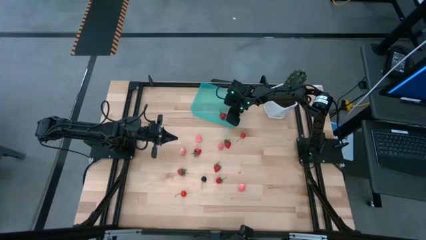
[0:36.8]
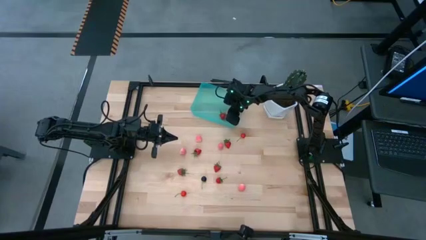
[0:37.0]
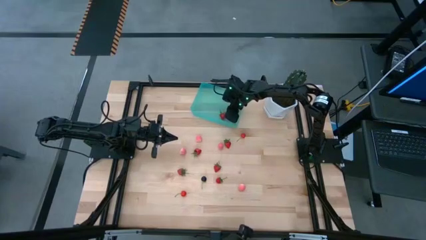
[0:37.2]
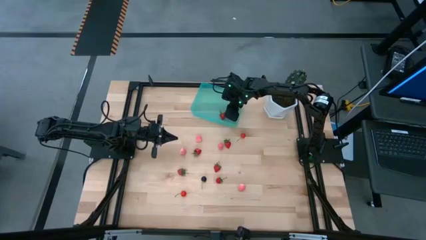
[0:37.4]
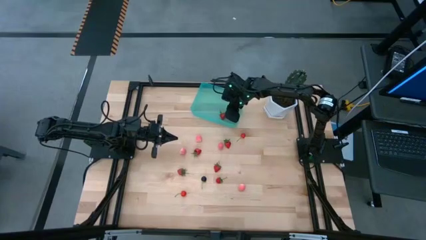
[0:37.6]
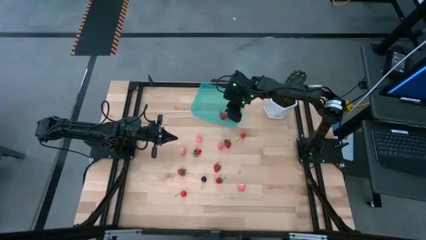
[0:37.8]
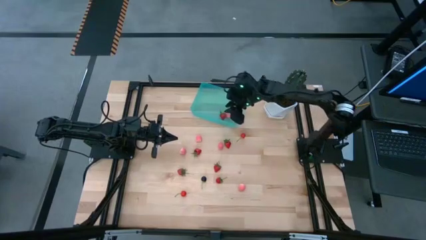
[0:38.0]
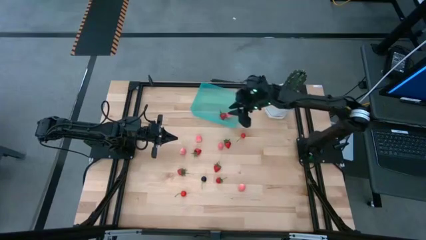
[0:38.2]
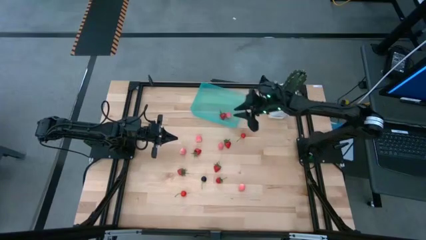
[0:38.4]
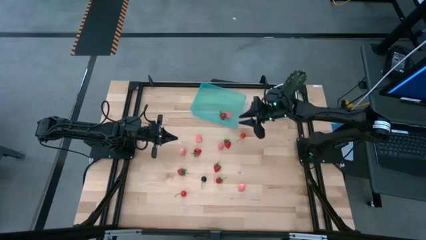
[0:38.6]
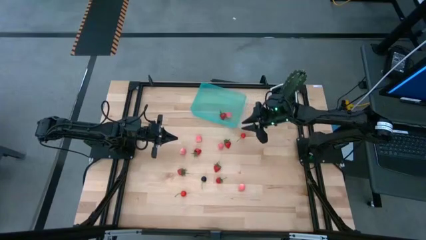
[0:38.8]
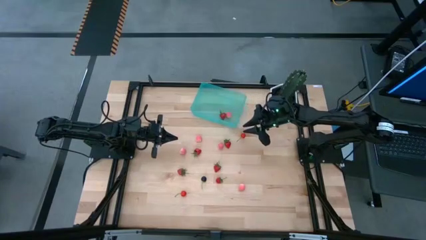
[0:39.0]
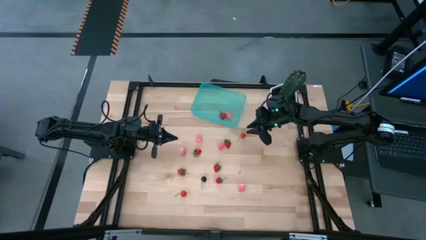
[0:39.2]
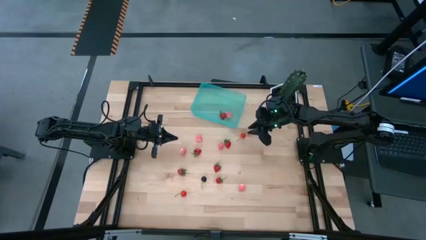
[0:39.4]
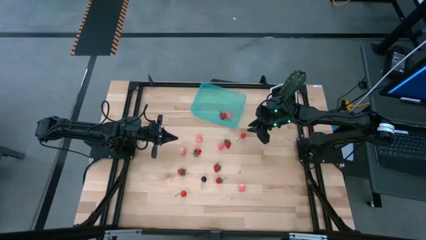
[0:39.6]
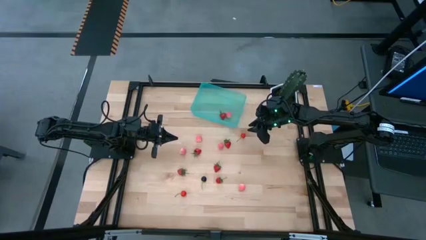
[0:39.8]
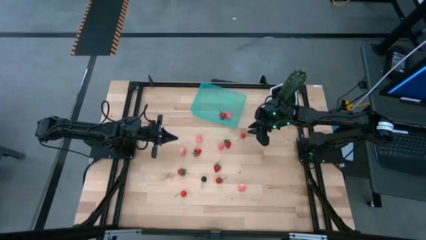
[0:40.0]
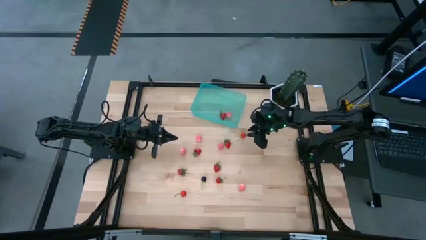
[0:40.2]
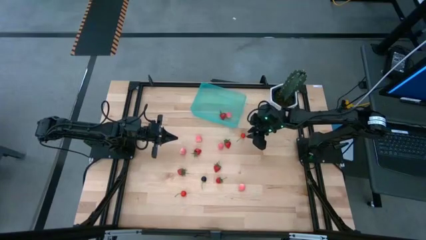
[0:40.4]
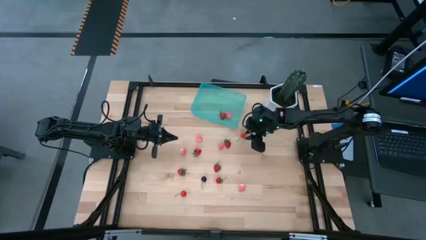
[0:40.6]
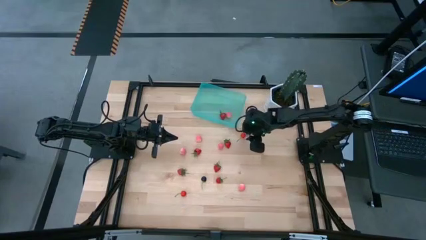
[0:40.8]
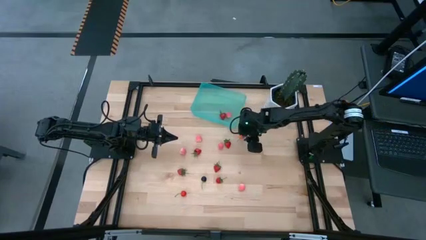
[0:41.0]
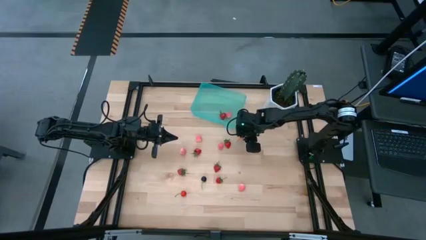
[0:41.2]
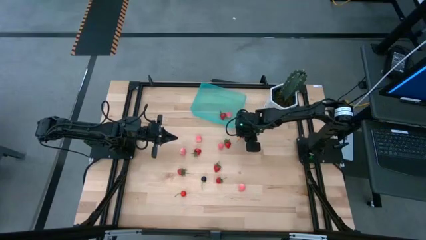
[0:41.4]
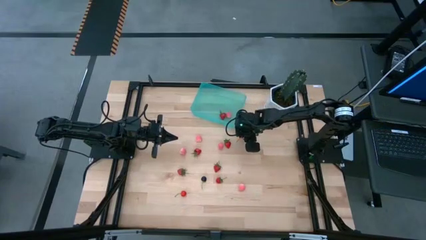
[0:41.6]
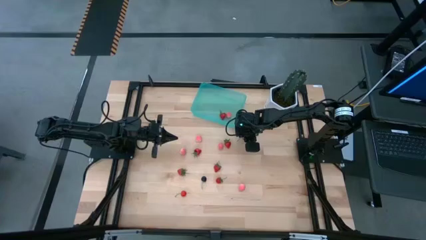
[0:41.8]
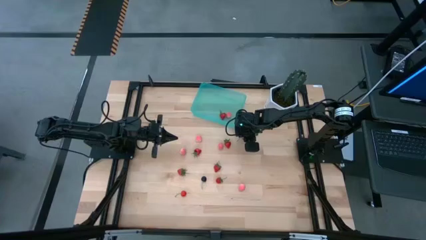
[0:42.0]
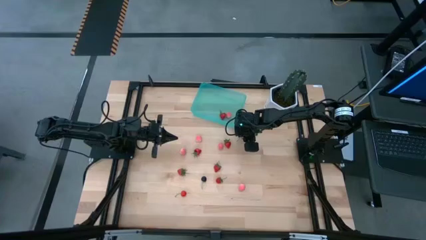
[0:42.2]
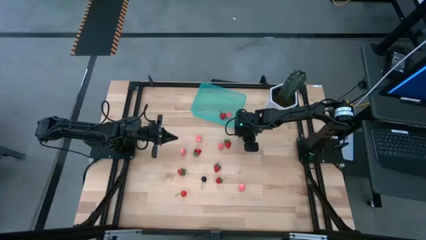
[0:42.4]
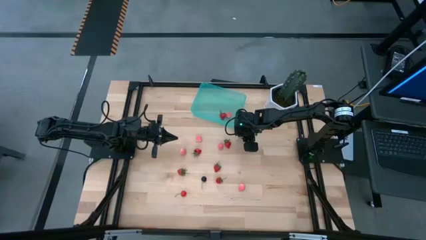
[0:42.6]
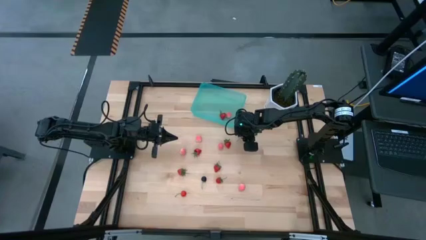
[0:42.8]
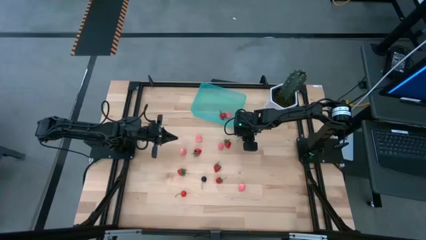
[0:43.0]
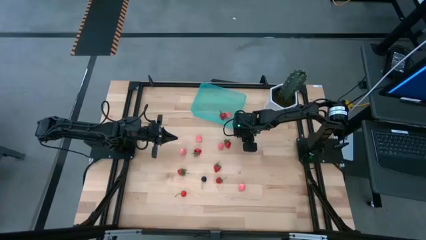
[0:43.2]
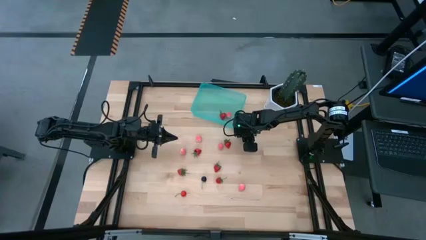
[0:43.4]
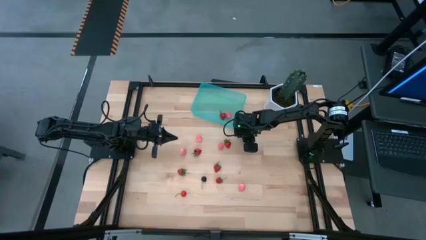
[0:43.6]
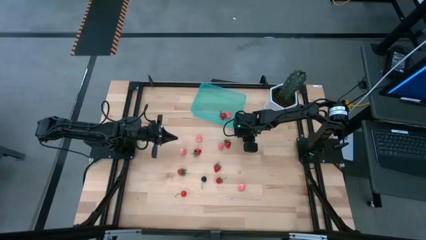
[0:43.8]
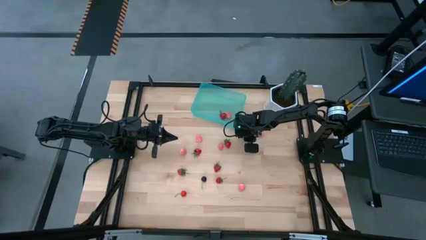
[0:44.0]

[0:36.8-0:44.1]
Task: Pick and placing Produce into tupperware
Put the red cherry into the light blue bin

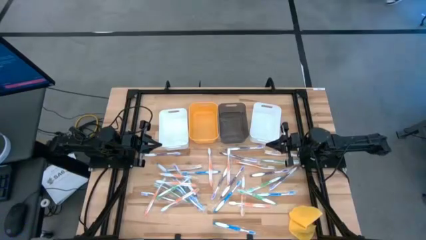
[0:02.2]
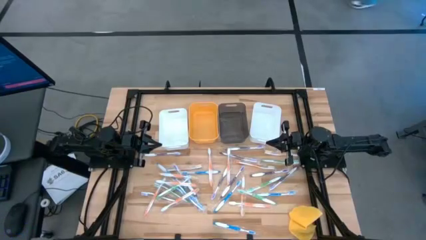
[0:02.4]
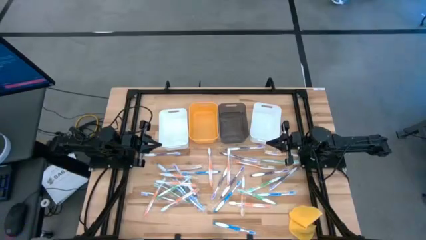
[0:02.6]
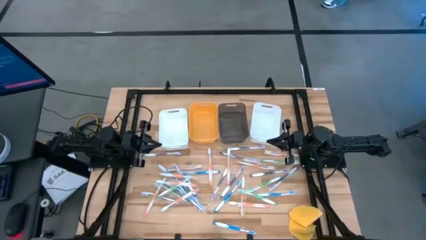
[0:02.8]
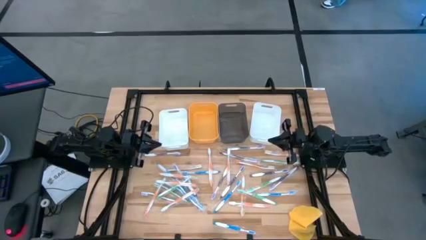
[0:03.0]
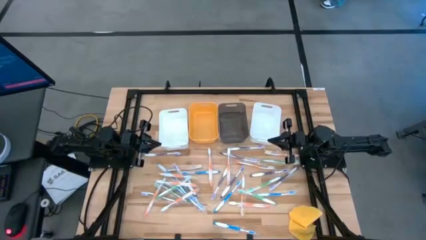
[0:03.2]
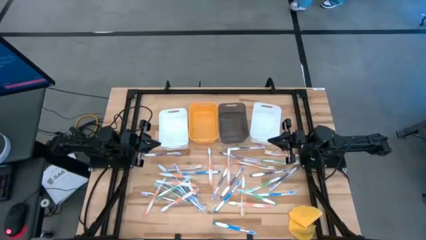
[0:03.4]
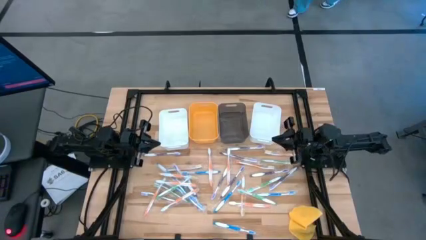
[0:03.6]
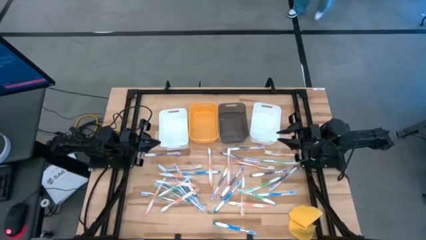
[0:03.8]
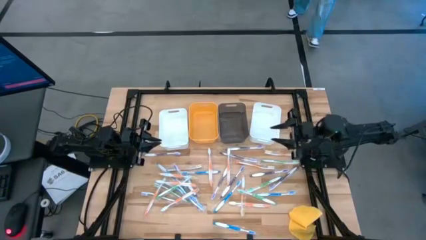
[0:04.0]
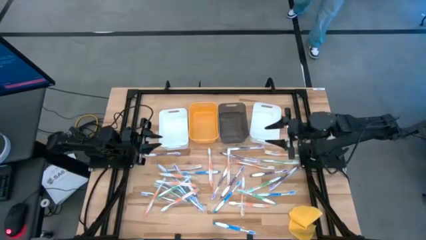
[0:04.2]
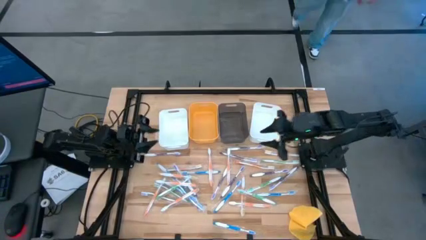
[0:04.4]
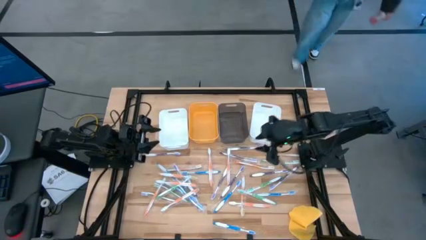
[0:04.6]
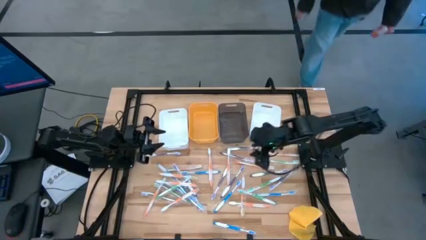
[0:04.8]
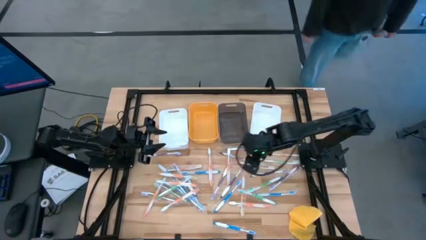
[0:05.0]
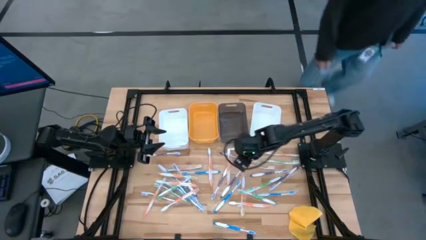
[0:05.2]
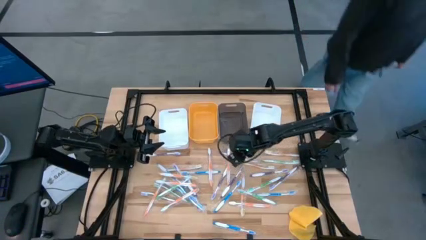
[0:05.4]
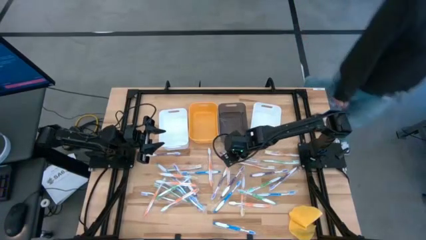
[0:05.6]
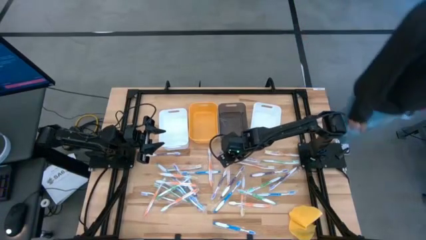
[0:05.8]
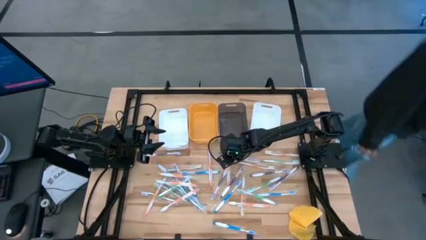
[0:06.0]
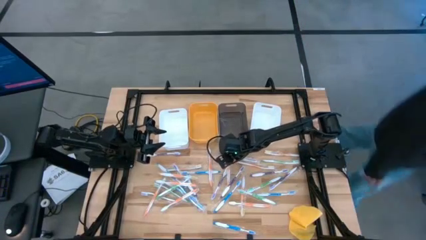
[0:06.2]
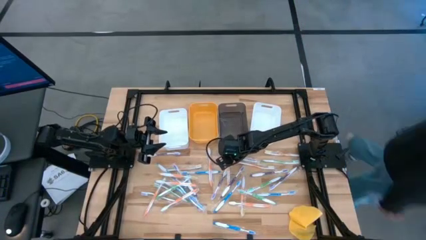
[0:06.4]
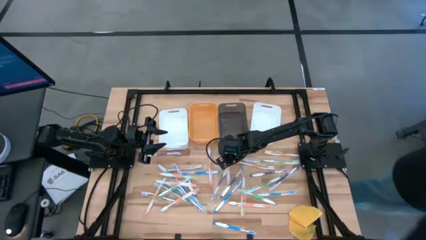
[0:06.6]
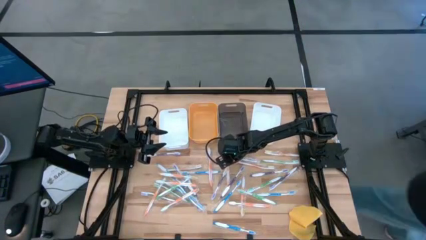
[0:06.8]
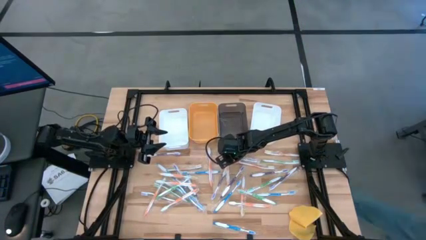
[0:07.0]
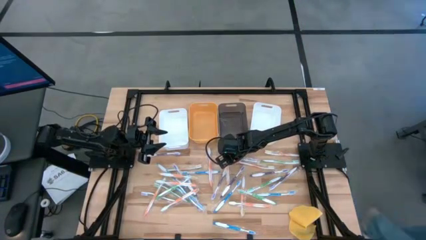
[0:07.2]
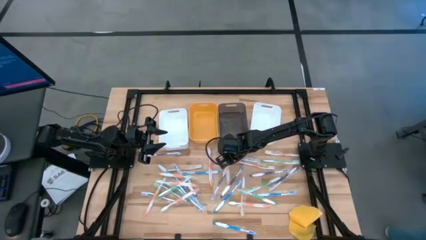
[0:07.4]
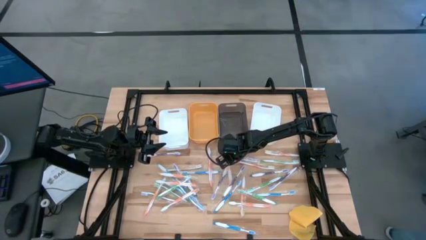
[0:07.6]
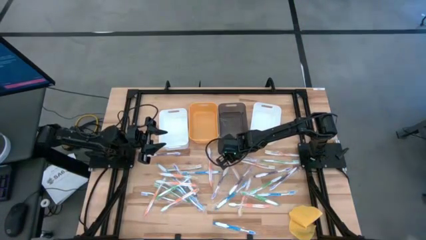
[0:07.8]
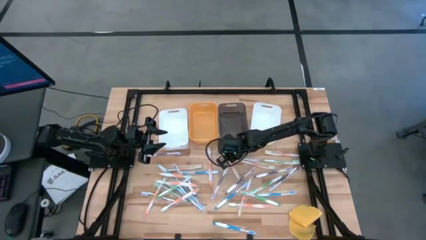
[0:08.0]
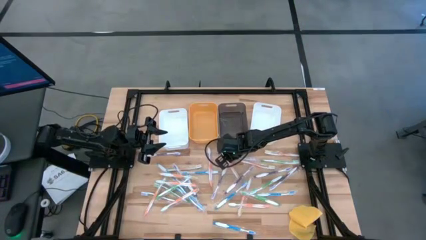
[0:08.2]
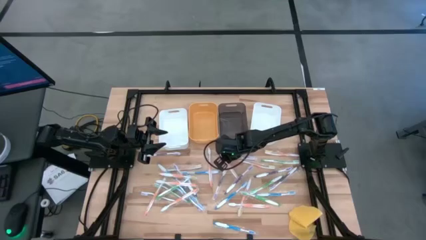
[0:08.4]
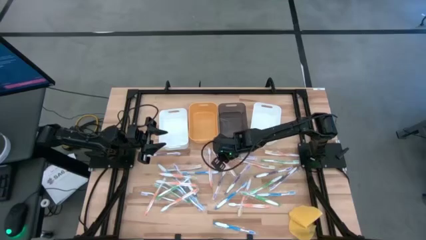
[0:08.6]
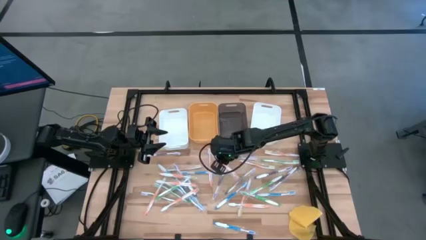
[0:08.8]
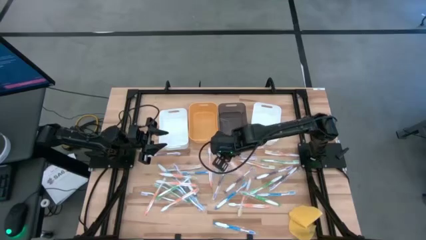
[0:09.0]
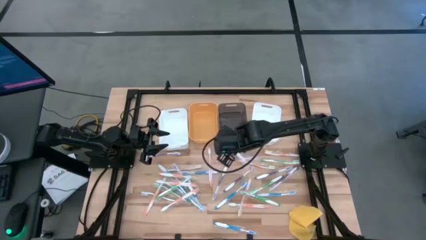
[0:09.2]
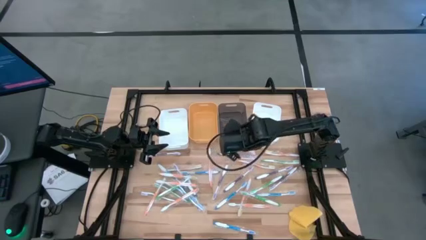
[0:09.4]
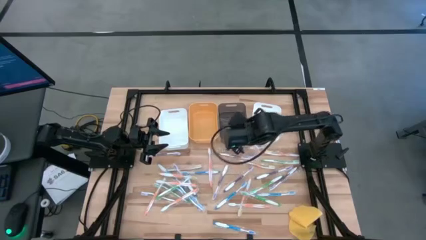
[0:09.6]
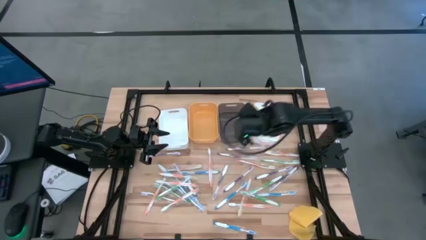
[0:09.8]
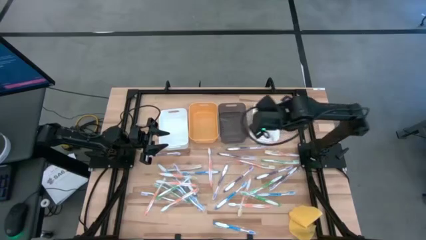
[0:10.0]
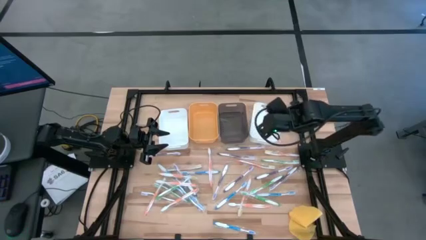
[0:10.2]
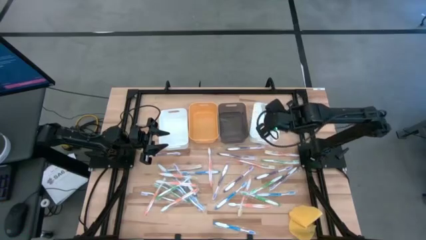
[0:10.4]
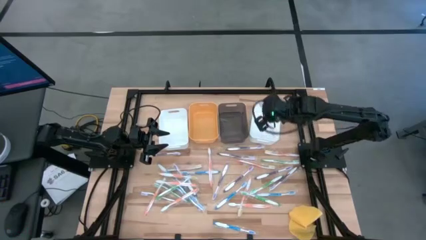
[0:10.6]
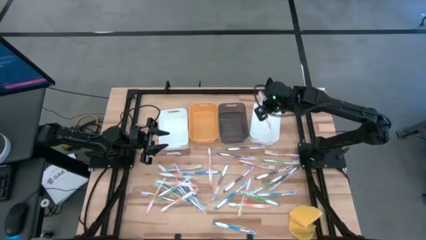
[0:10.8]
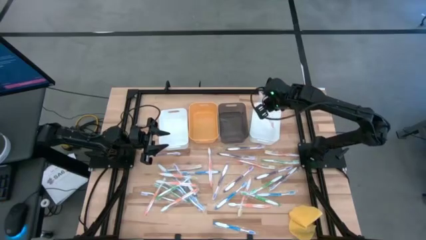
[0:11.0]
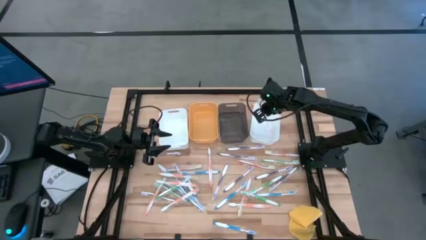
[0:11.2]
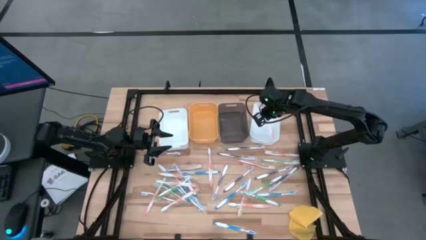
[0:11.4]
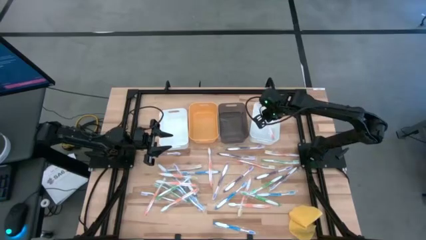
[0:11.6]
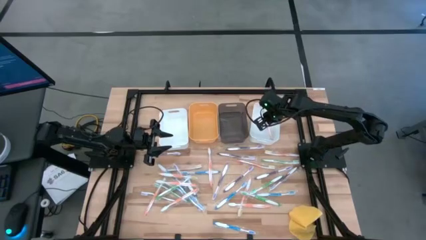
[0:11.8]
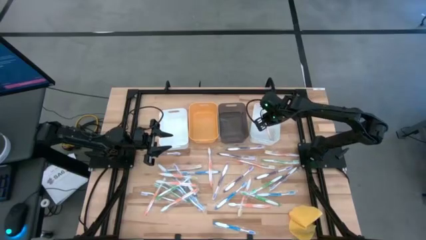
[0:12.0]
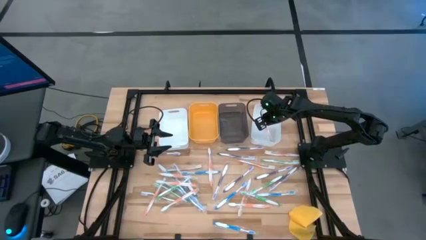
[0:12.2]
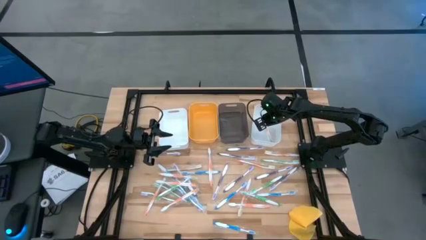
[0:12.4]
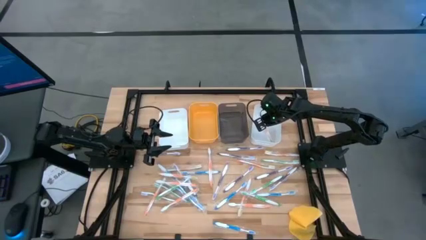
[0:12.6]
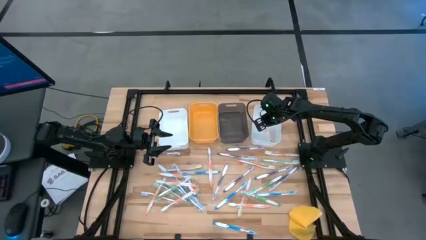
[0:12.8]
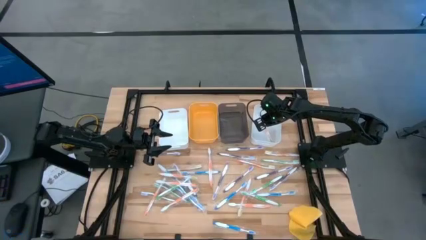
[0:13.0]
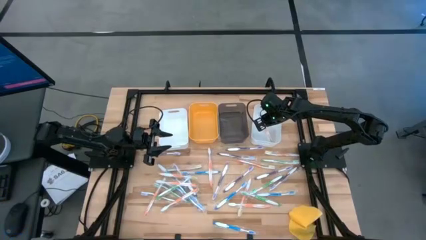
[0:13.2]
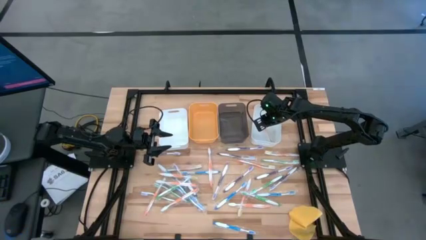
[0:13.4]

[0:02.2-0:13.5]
Task: Pick & Place Toothbrushes
Put the orange toothbrush into the right white bin
